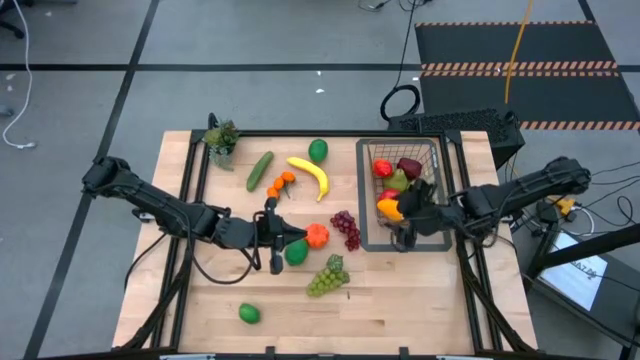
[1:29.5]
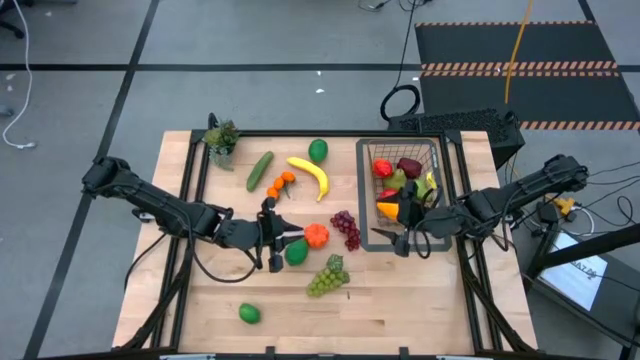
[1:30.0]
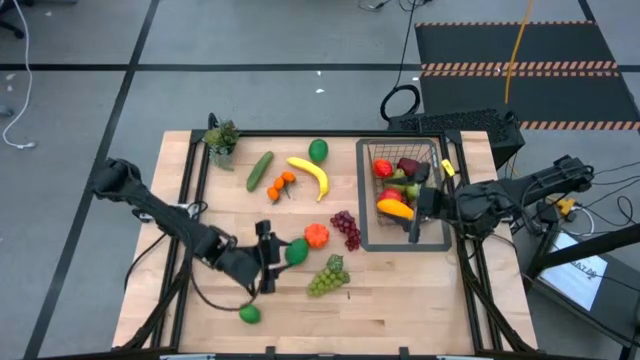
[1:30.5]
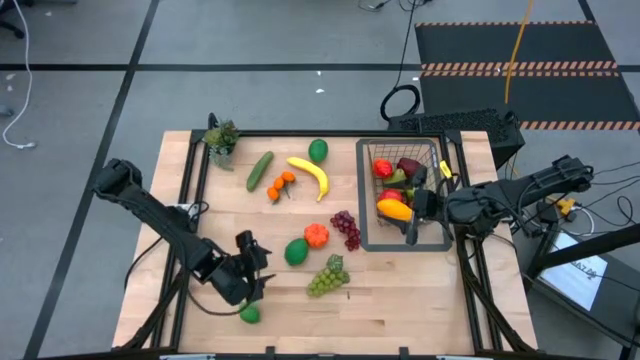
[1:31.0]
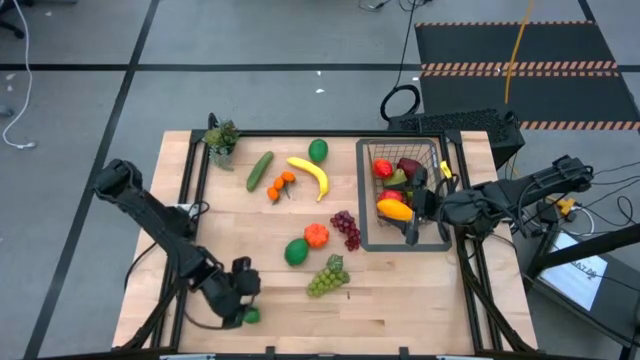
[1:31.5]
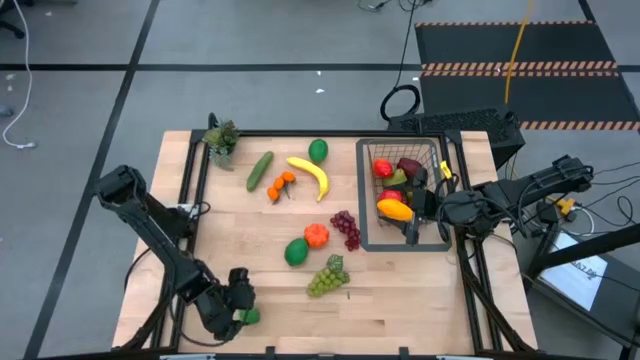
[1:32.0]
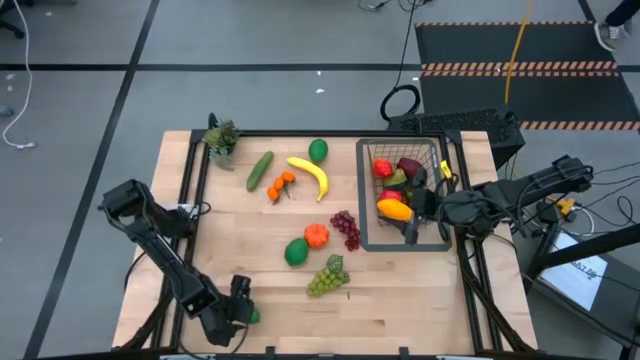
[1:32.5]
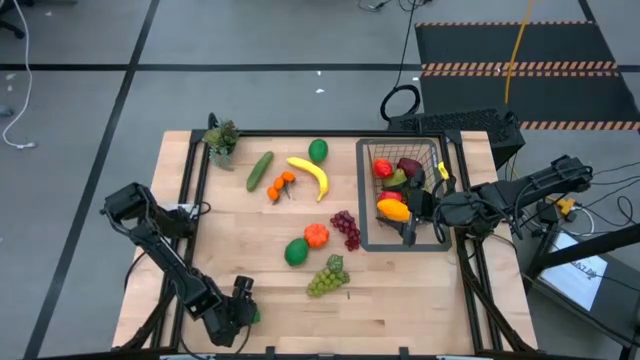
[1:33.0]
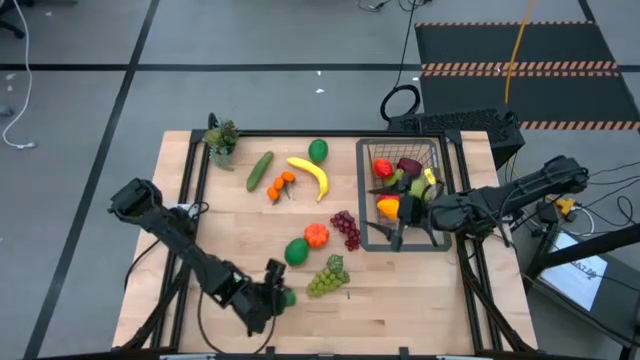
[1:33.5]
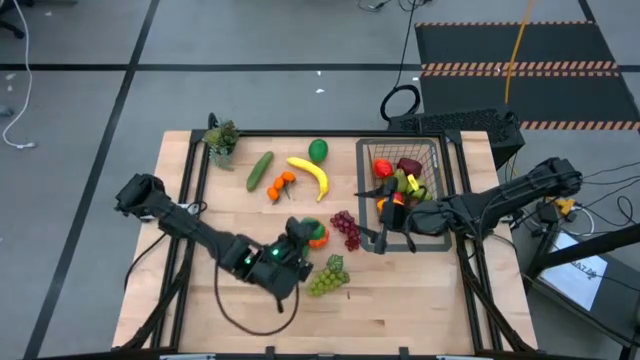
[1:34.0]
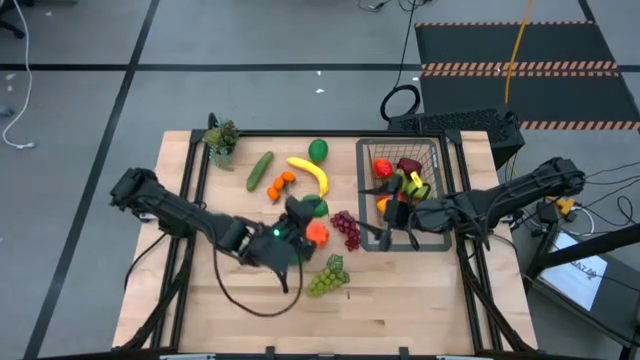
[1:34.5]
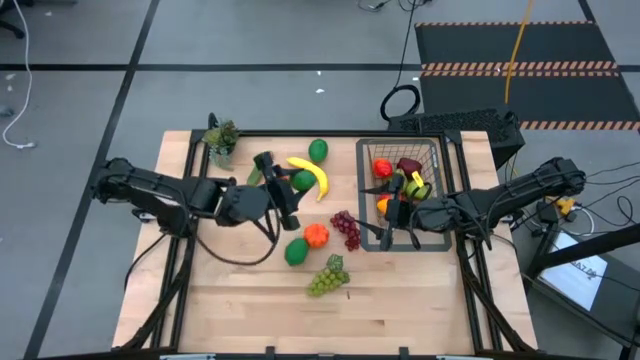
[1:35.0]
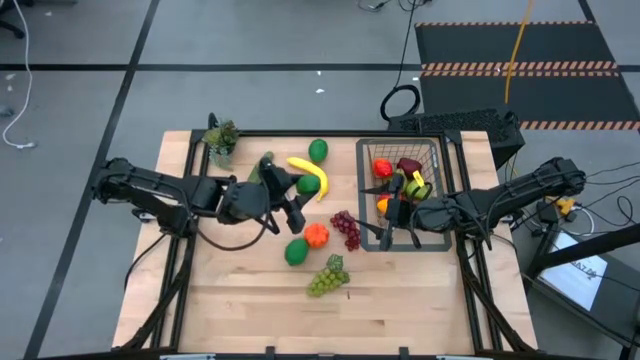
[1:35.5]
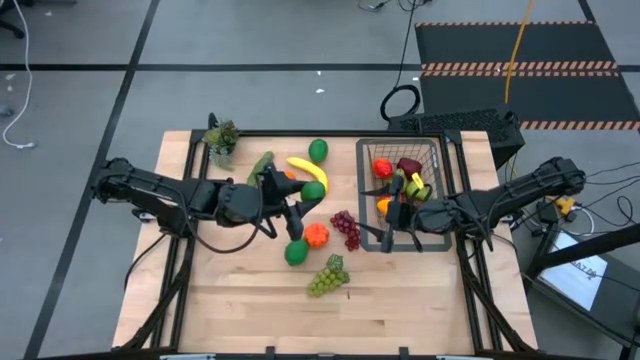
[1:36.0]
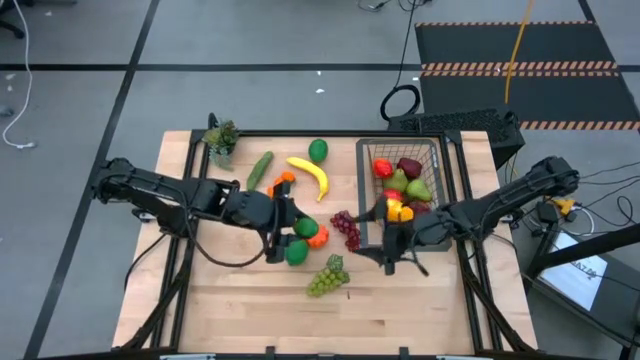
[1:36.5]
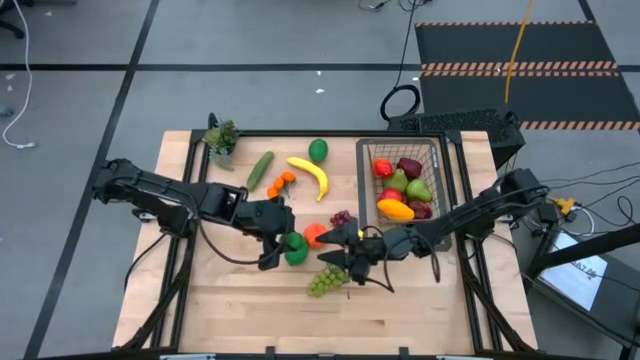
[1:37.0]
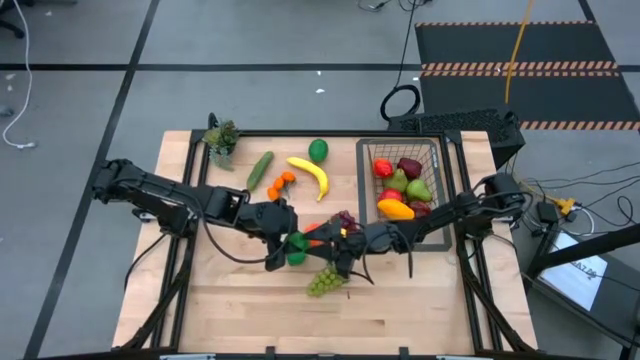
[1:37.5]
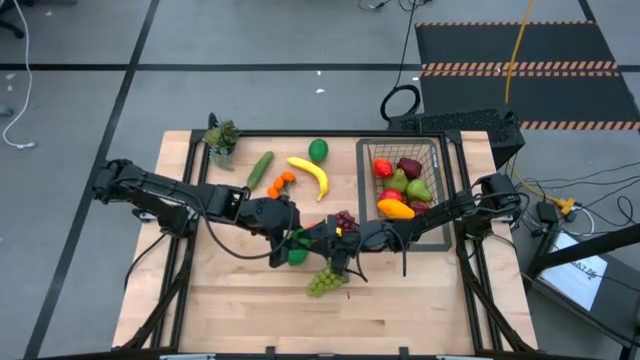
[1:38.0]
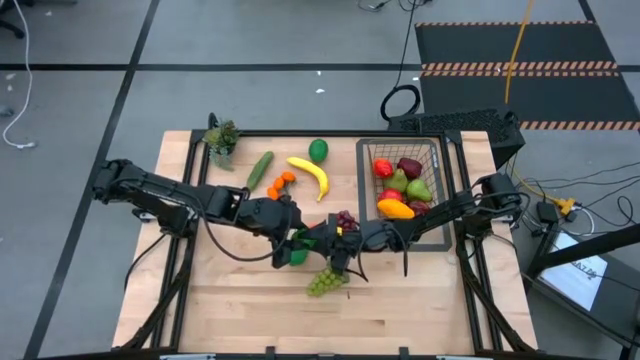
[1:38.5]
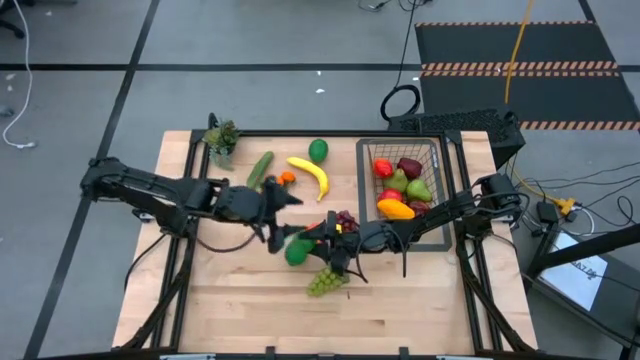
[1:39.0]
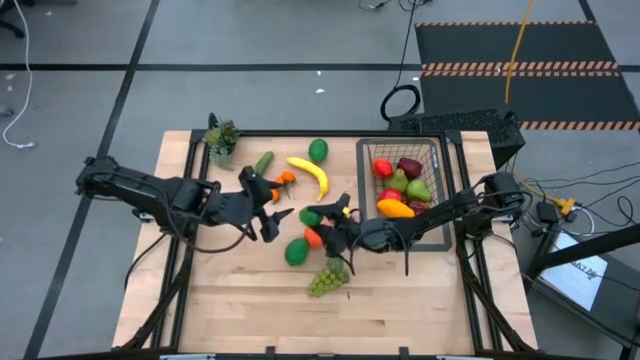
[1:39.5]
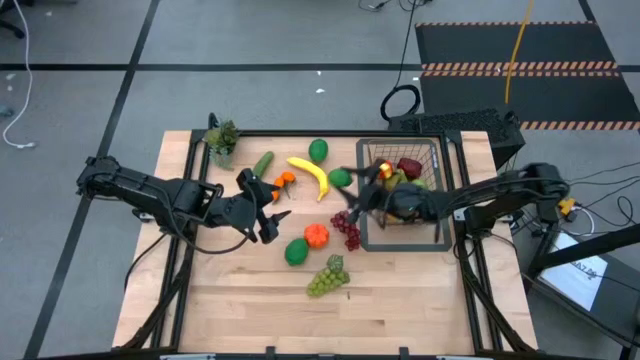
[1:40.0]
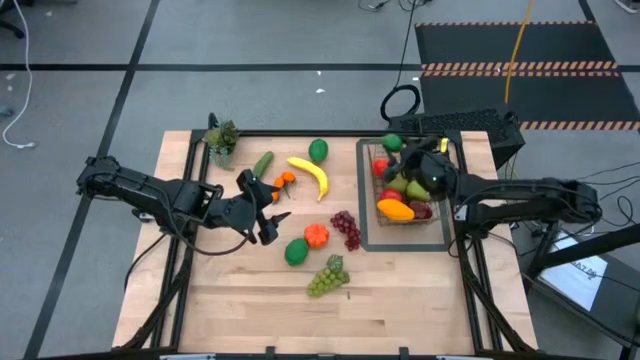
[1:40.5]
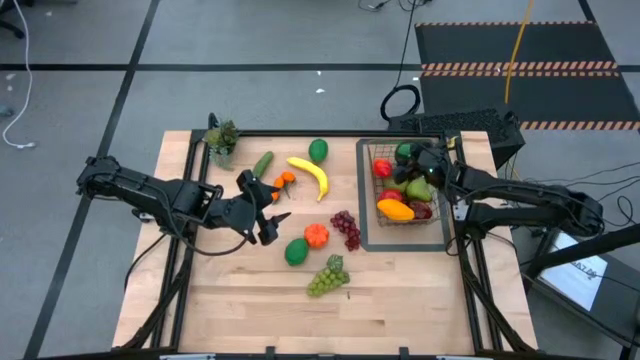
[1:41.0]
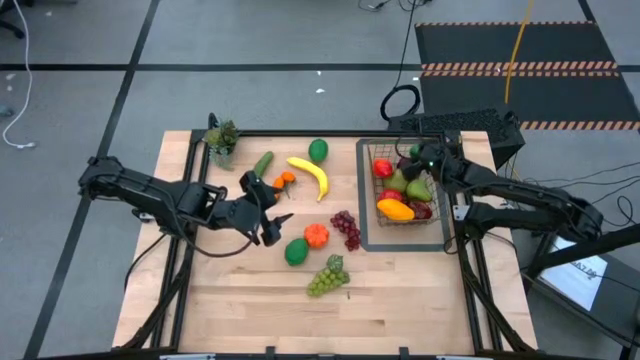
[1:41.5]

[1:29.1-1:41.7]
Task: Build produce basket
Put the bottom left lime into the gold wire basket

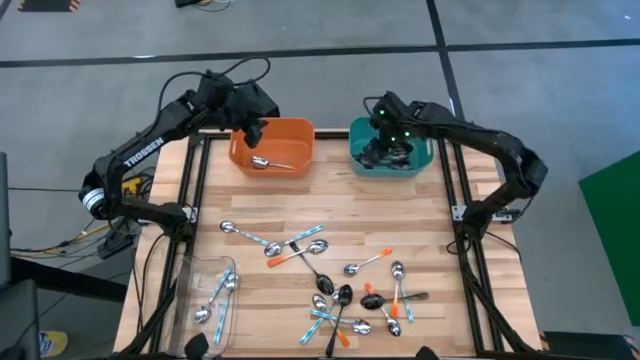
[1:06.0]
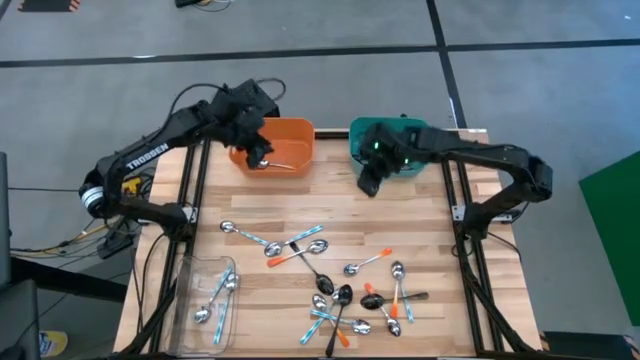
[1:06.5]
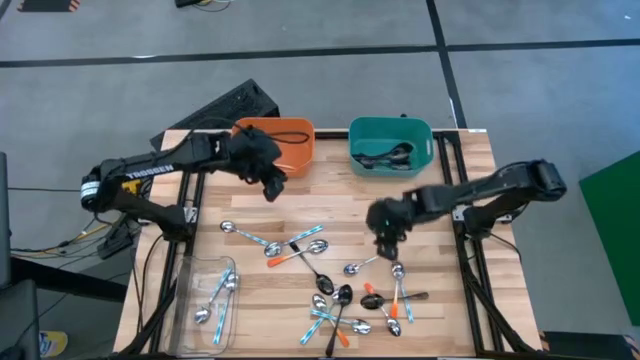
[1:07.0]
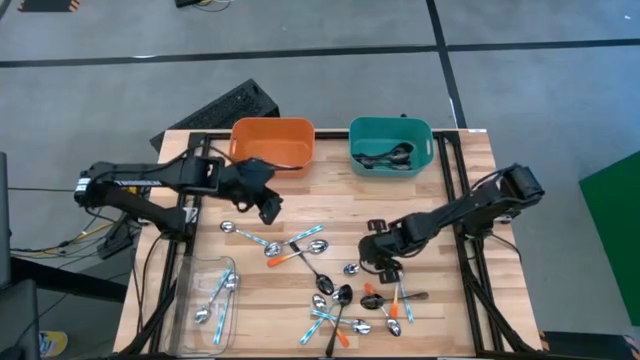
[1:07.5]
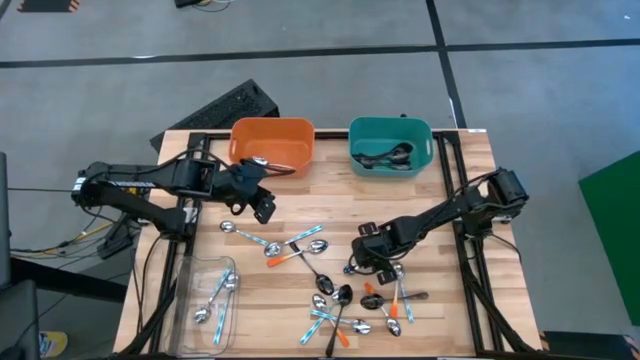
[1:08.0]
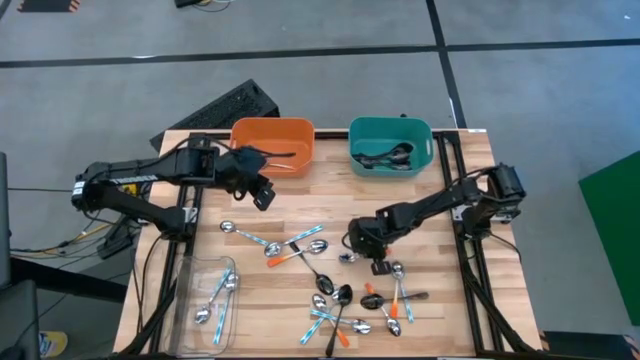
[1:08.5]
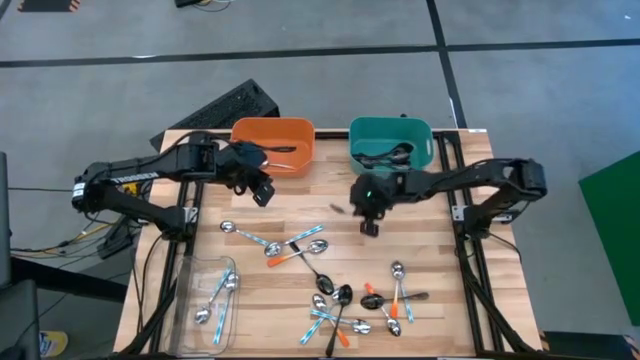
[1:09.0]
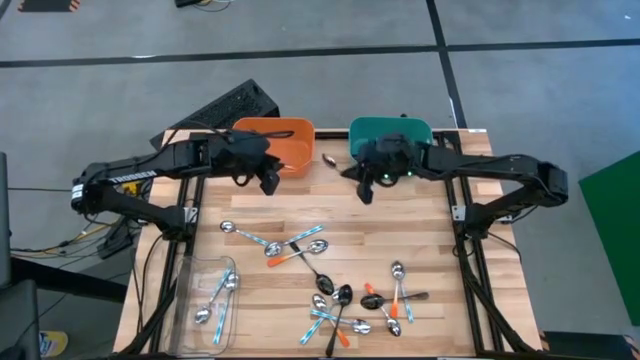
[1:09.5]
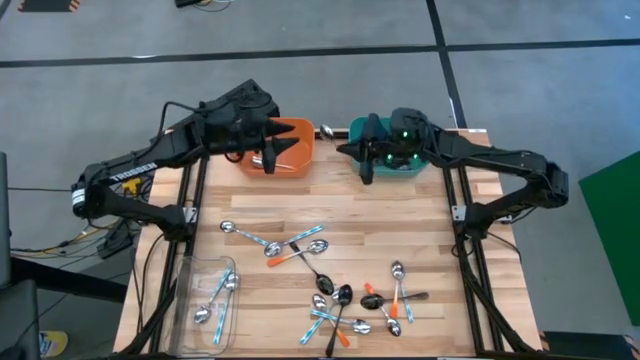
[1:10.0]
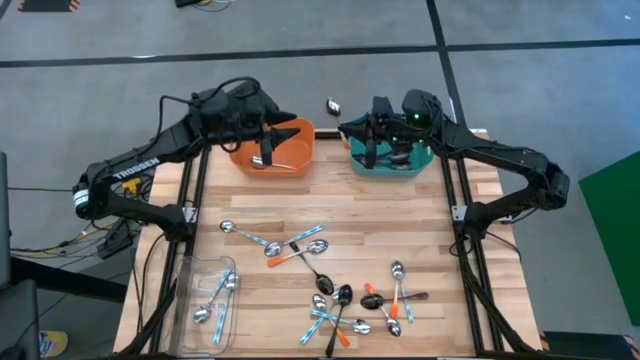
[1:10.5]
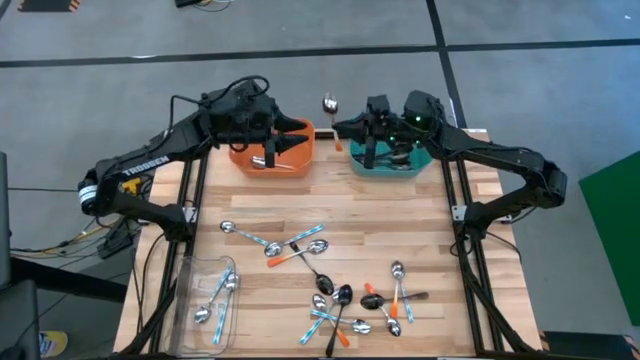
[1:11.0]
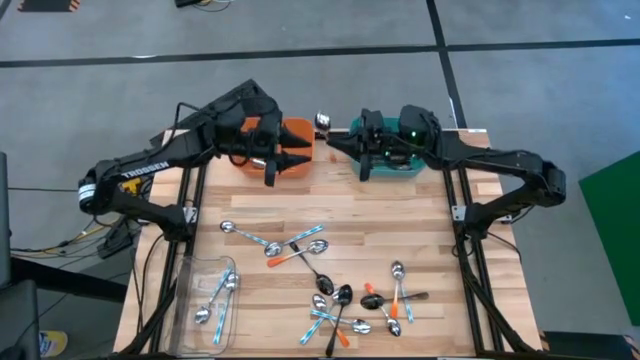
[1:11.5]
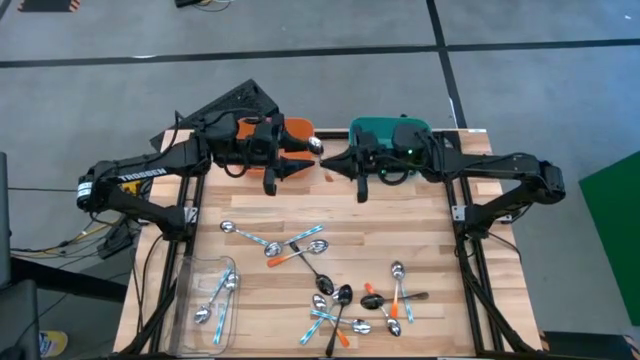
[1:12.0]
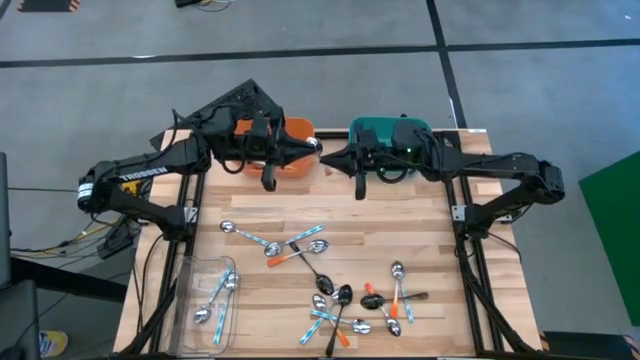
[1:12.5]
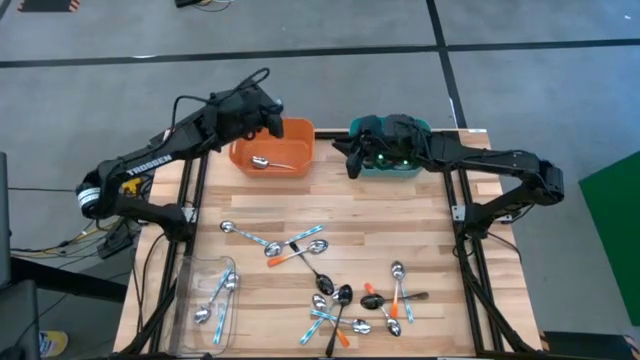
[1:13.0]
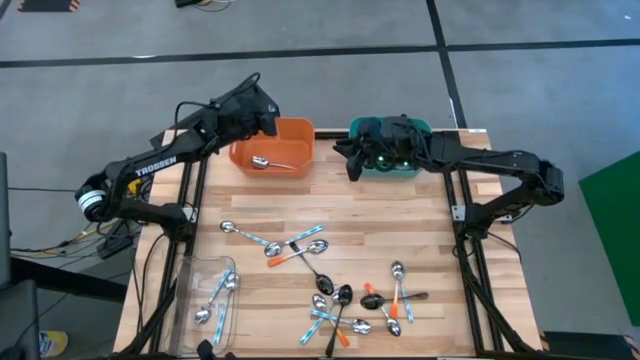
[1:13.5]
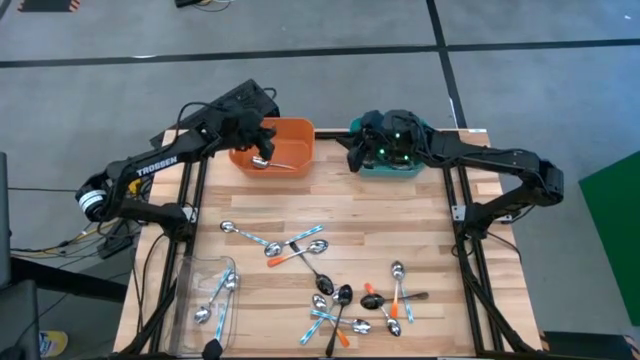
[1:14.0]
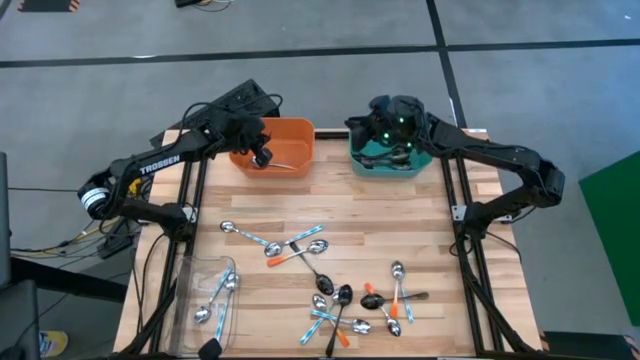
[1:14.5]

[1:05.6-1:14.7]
Task: Sort silverware by color (type)
Put the orange spoon into the orange bin
